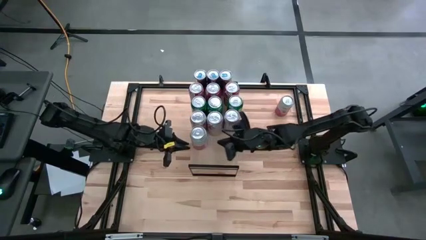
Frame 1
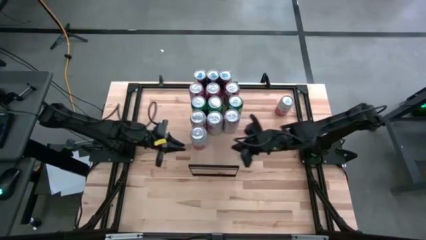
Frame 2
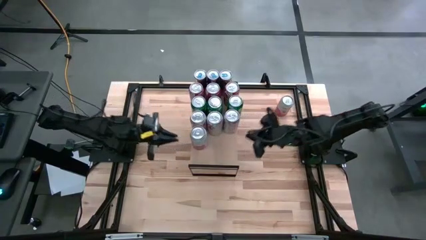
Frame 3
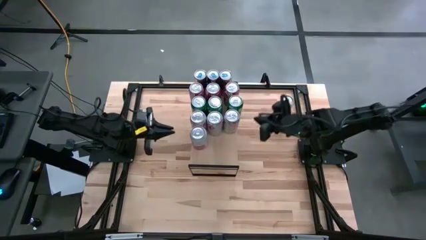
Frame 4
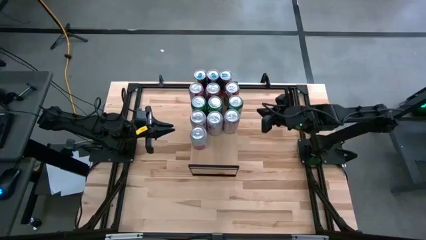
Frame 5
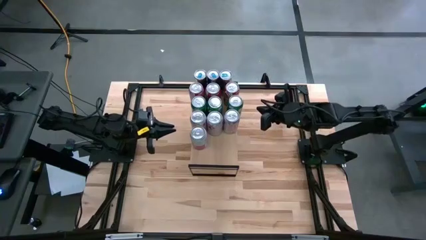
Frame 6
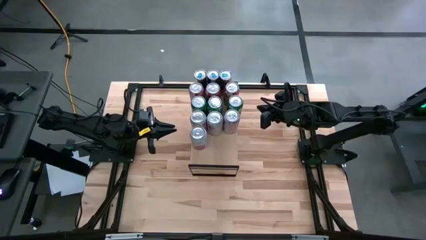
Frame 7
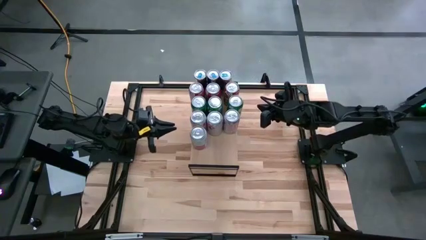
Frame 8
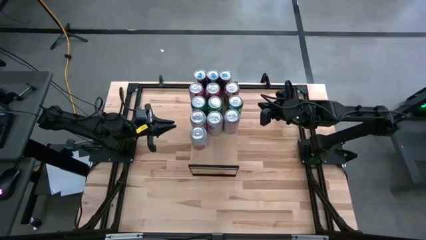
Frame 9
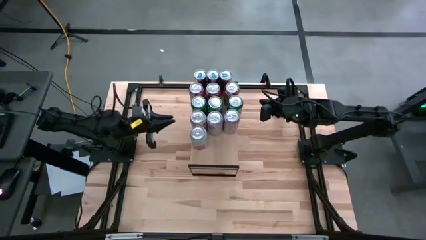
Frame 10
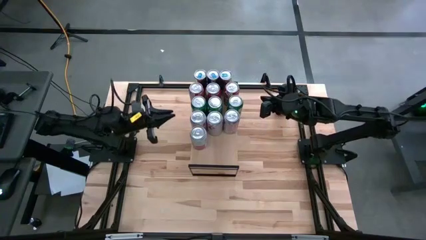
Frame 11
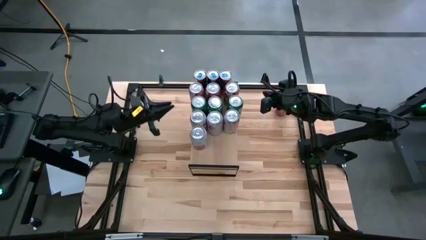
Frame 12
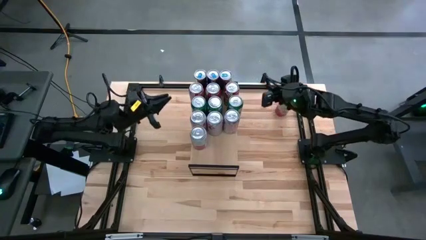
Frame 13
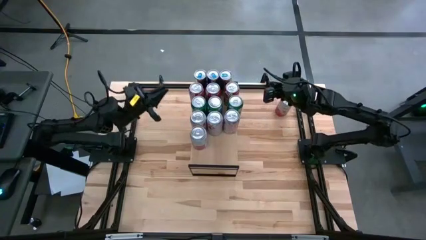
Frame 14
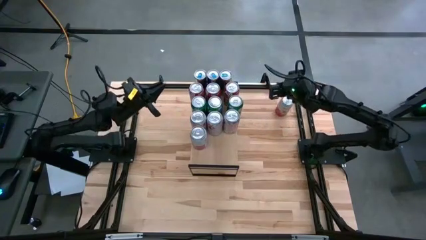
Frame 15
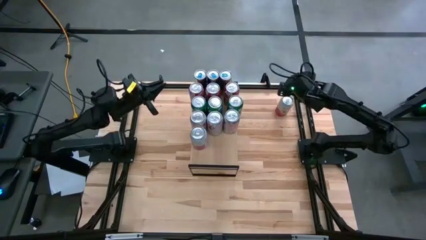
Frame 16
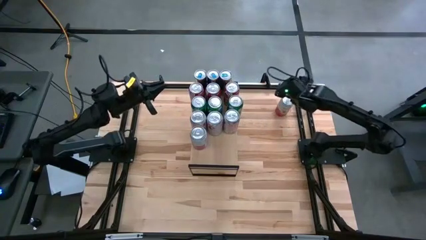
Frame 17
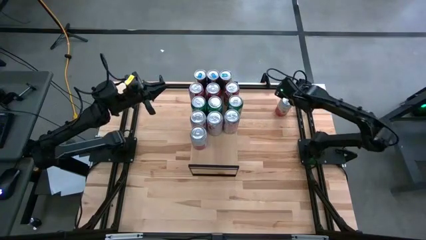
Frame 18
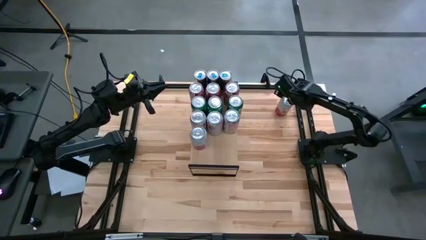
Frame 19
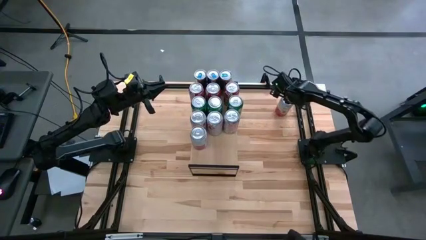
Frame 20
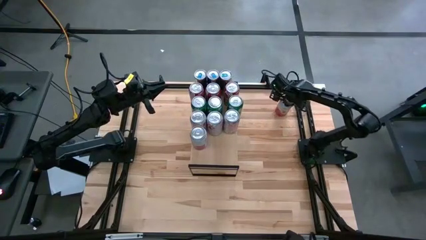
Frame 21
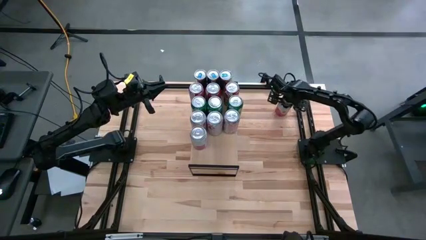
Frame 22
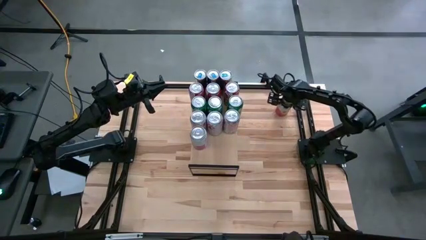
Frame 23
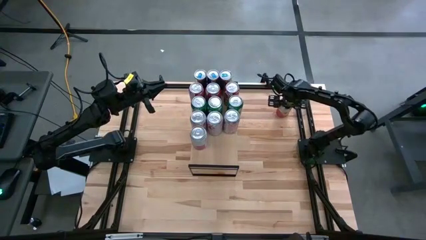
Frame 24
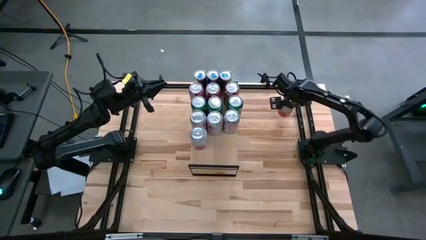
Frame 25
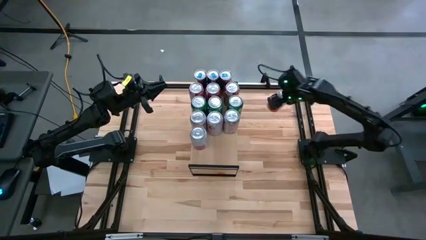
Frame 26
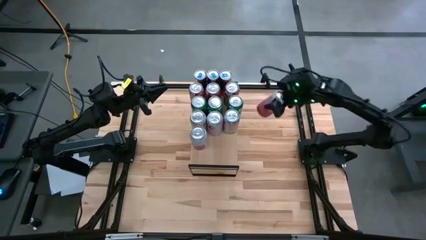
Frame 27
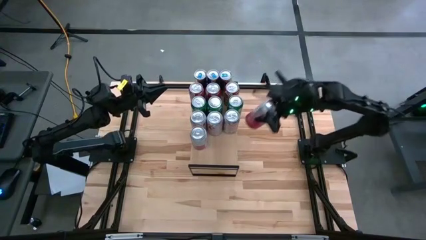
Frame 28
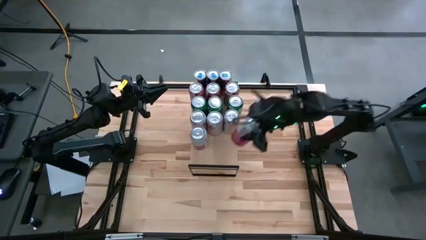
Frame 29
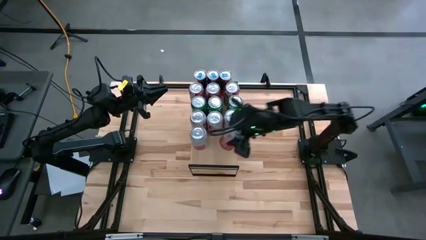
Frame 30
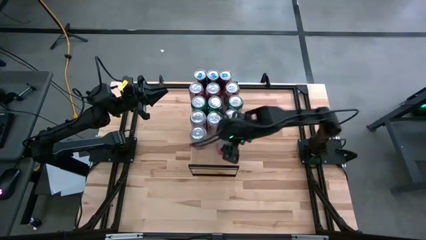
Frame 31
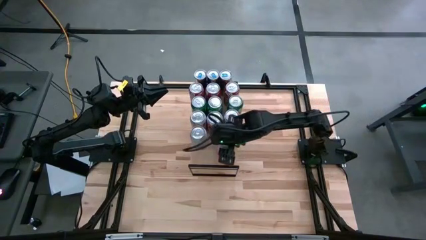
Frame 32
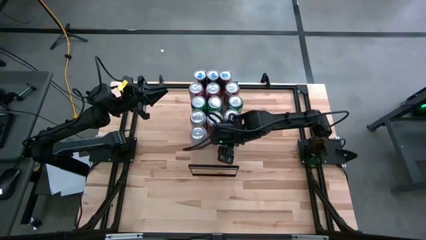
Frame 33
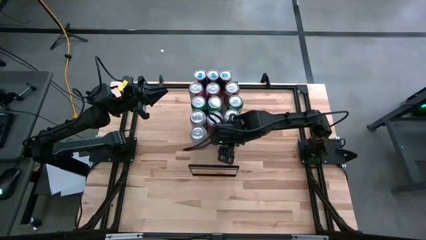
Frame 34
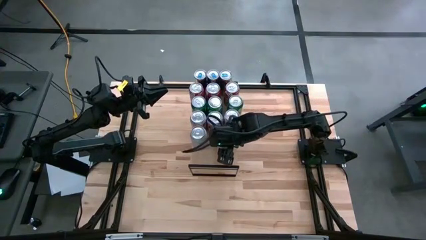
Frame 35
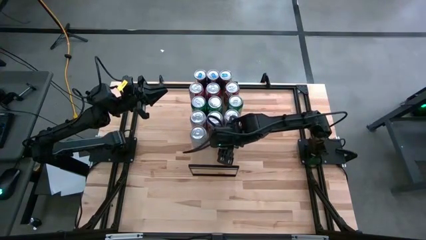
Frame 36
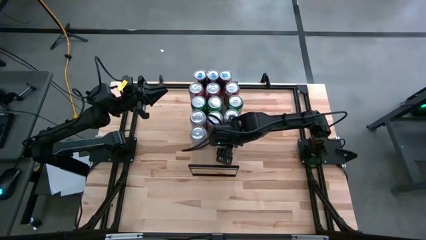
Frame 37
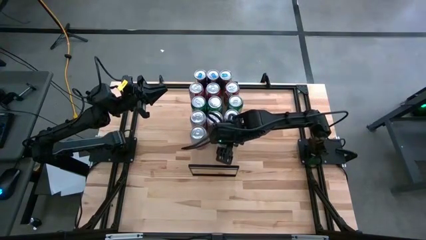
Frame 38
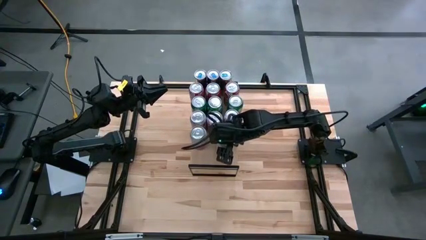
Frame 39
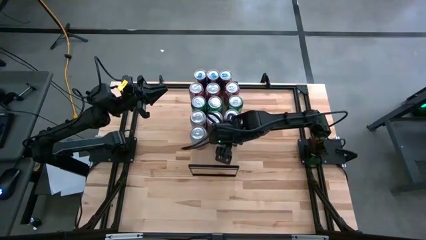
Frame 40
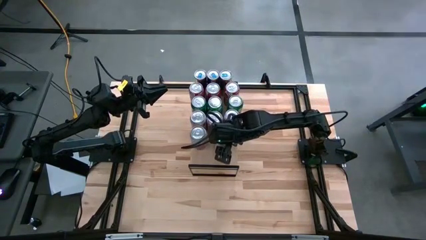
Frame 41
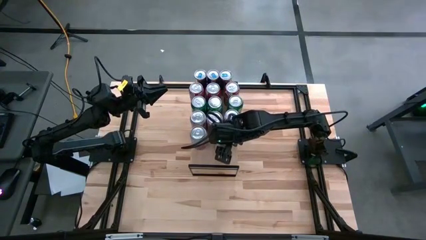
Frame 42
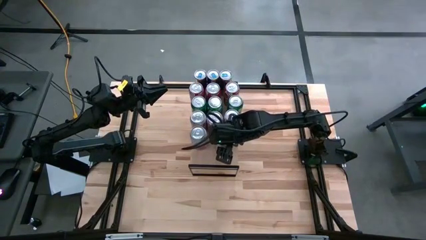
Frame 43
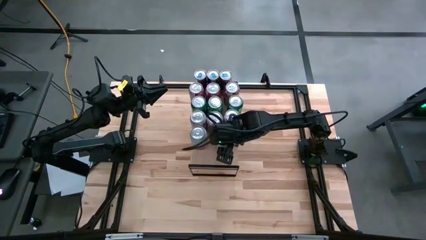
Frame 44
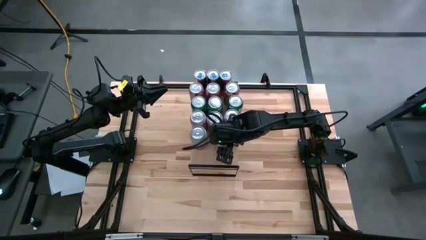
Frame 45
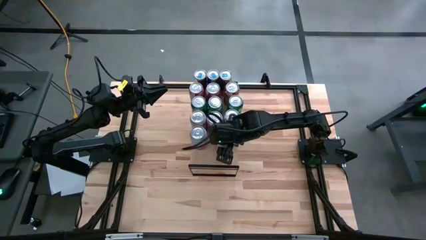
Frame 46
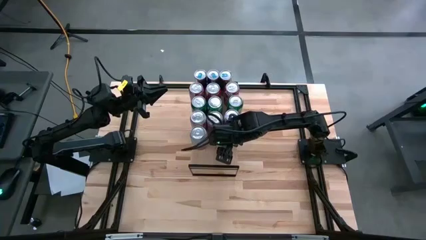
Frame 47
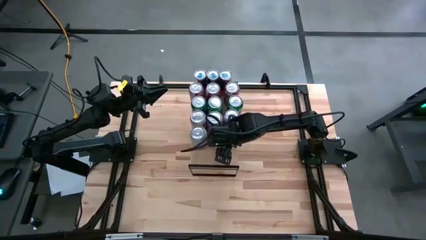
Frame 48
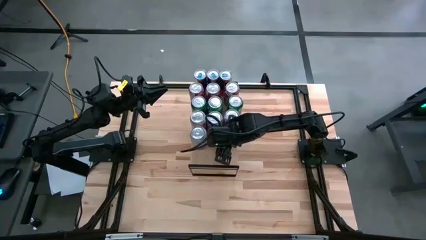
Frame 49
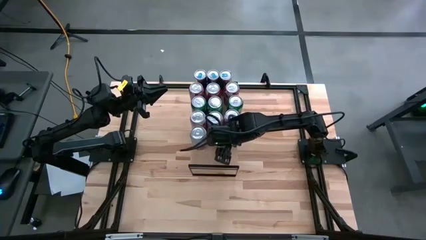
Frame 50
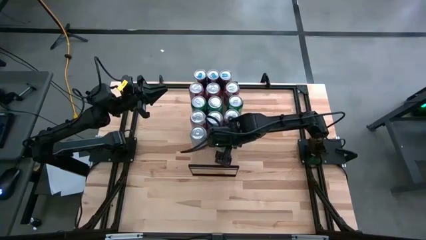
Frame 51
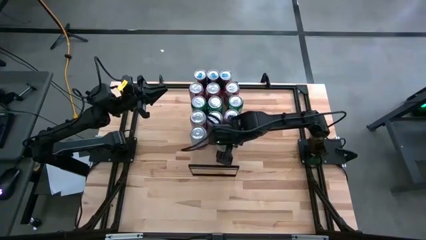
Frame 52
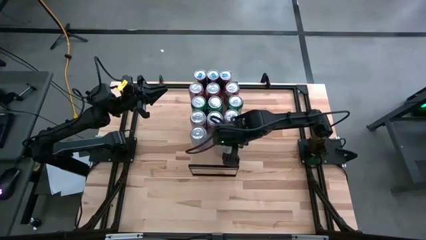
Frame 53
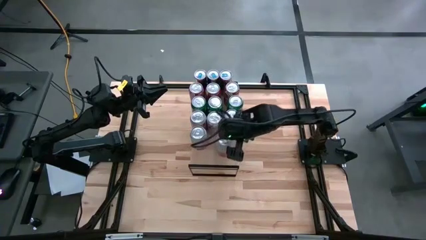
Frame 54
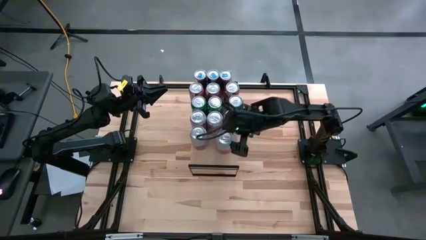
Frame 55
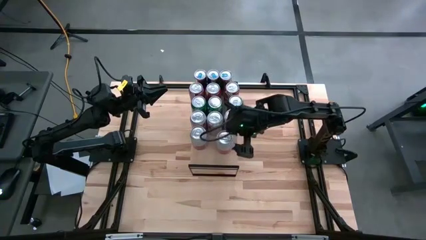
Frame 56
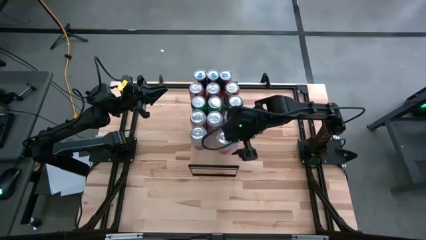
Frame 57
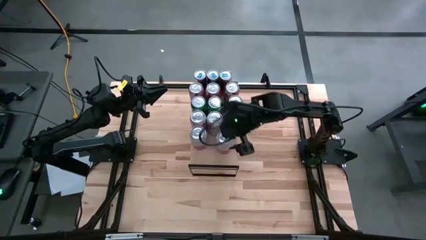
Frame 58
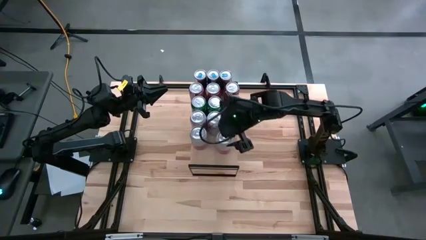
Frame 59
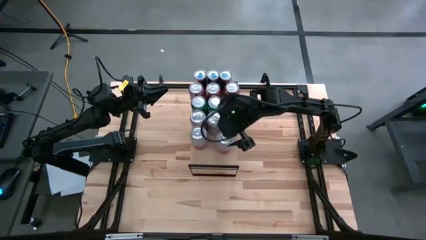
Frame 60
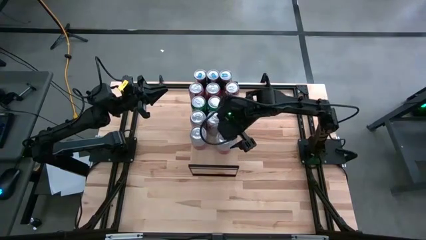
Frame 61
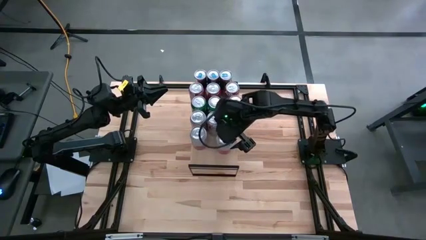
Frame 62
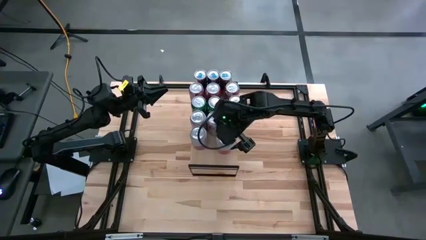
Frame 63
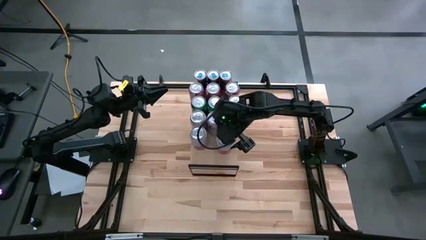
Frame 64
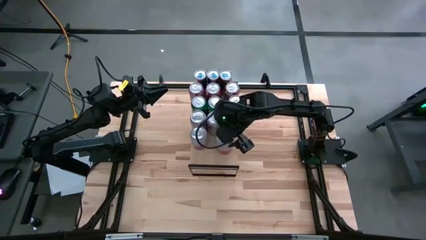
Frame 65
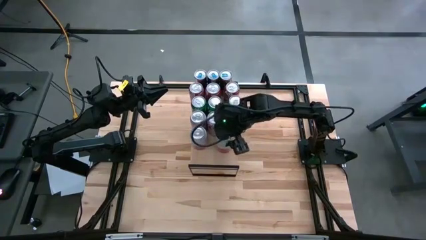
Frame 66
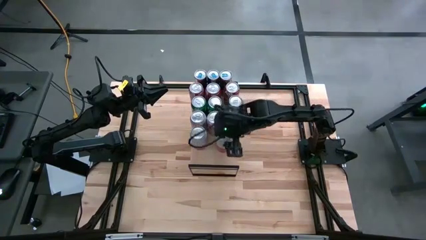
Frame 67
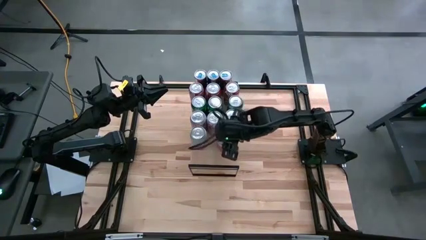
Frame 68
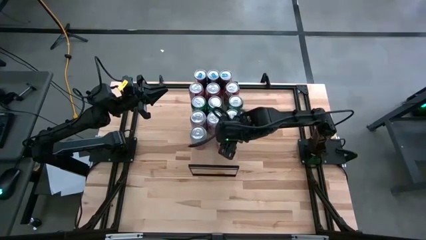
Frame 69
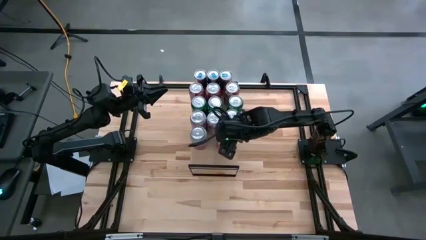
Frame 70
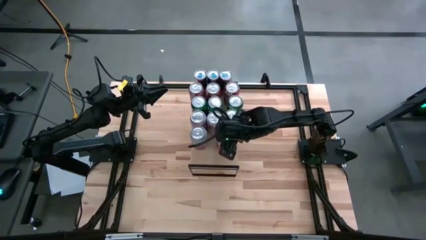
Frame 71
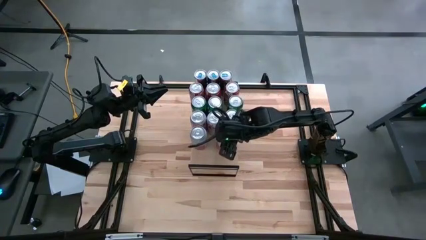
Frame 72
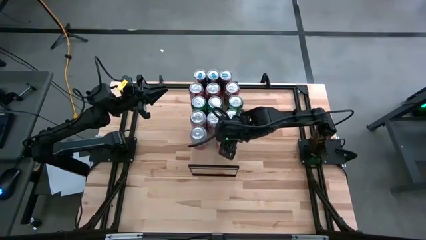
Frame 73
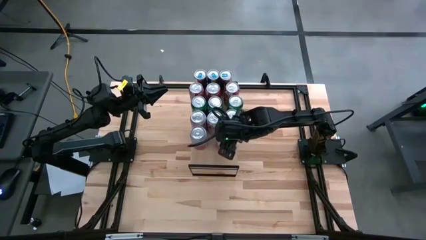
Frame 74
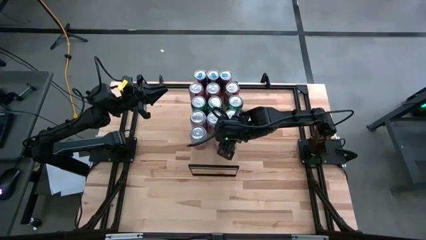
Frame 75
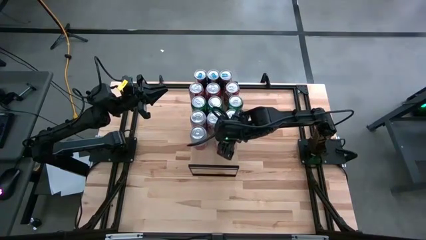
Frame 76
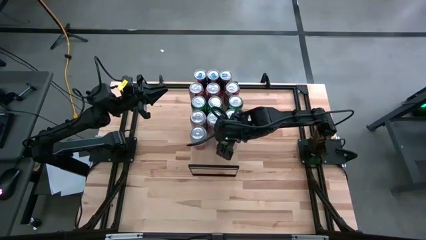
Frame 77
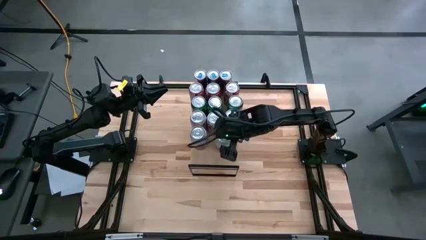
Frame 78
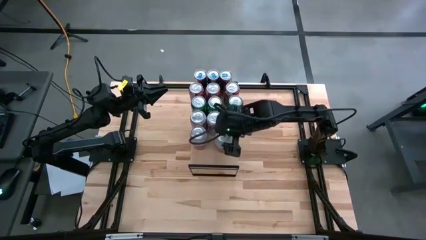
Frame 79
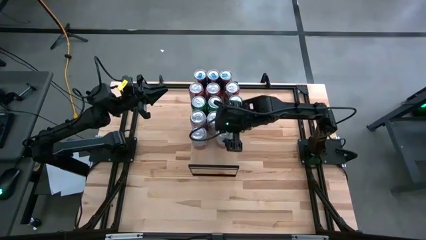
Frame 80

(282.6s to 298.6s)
Task: Place canned beverage on shelf
Put the pink white soda can on the shelf
